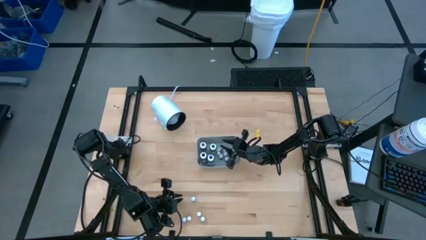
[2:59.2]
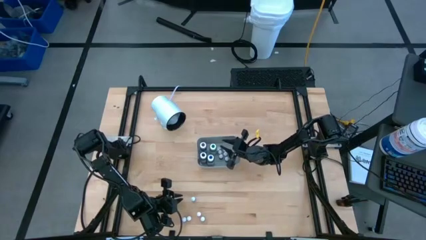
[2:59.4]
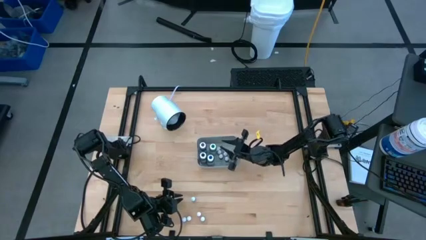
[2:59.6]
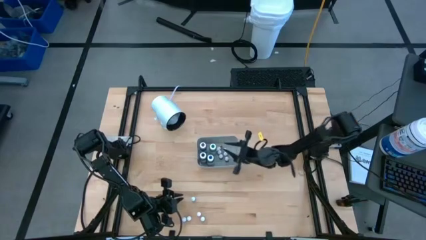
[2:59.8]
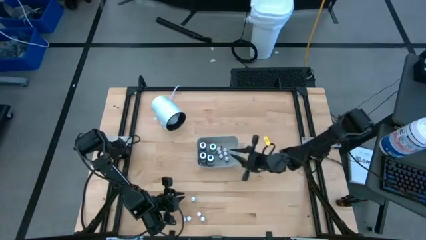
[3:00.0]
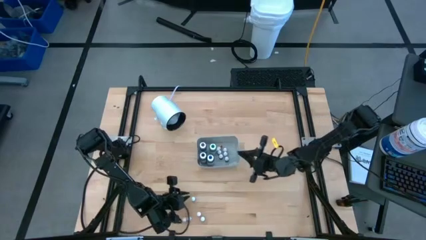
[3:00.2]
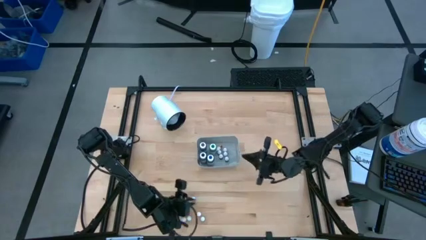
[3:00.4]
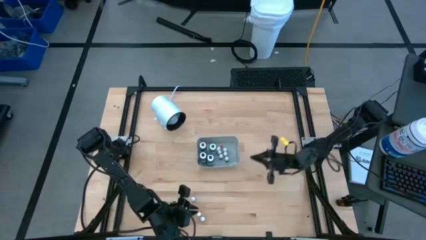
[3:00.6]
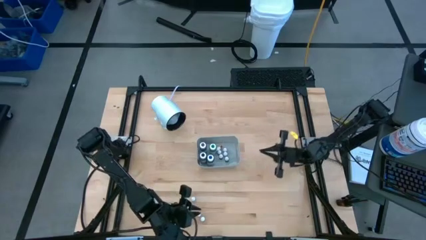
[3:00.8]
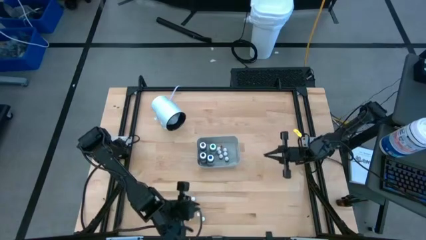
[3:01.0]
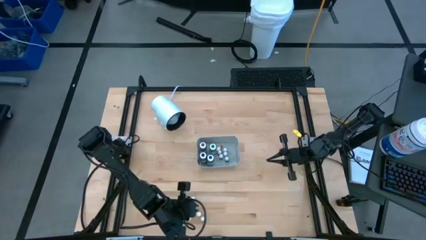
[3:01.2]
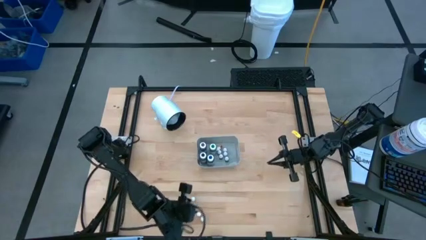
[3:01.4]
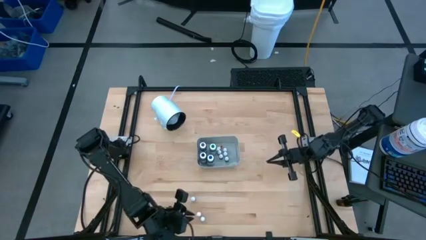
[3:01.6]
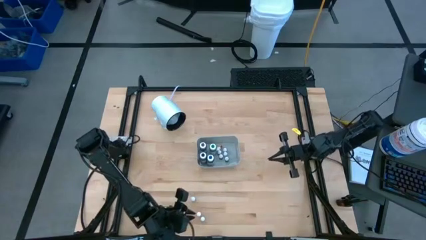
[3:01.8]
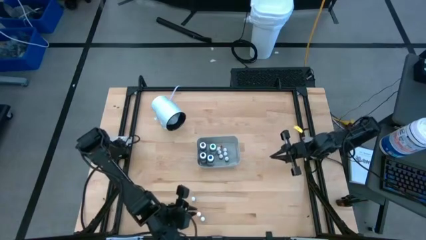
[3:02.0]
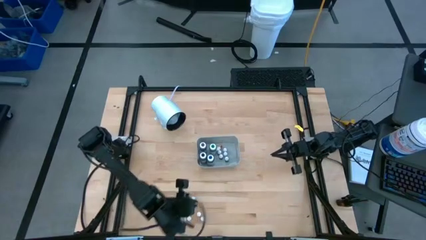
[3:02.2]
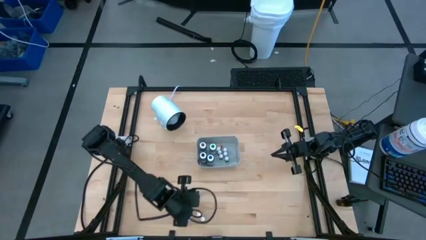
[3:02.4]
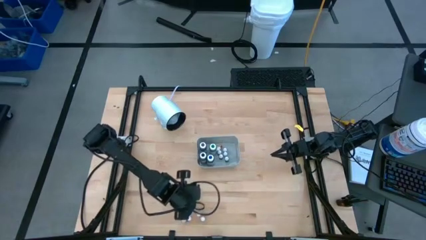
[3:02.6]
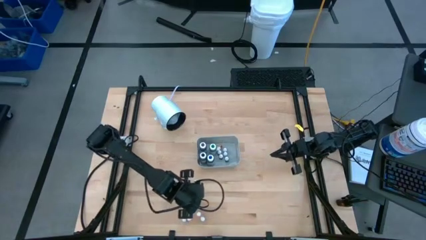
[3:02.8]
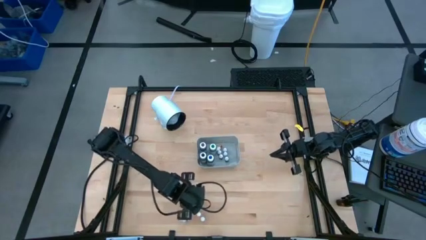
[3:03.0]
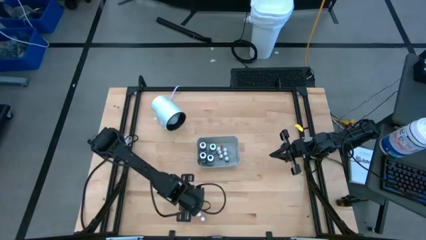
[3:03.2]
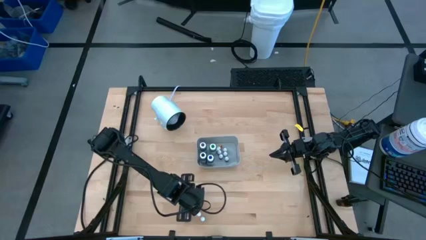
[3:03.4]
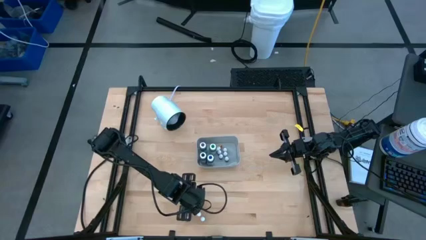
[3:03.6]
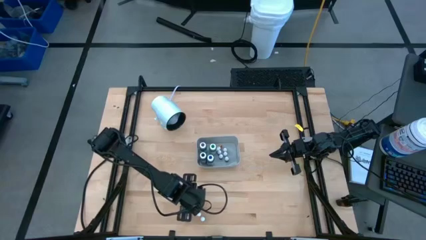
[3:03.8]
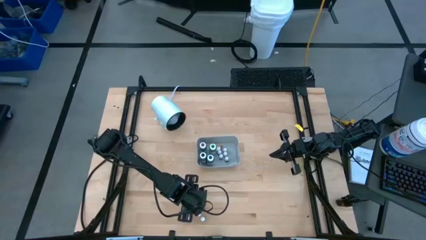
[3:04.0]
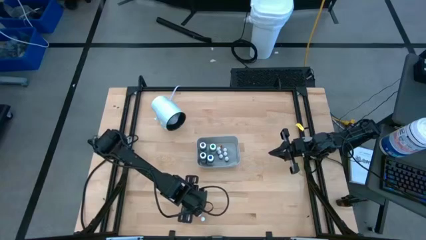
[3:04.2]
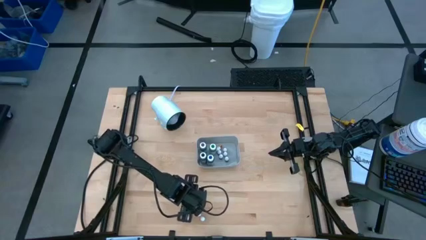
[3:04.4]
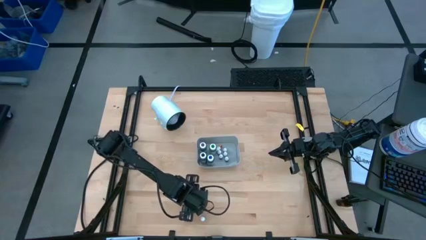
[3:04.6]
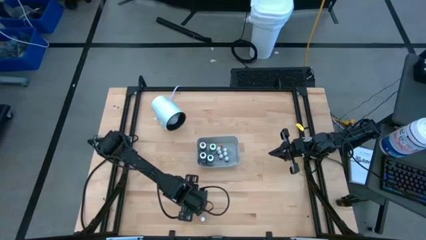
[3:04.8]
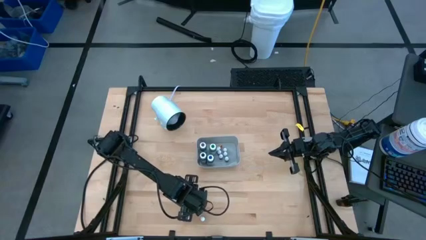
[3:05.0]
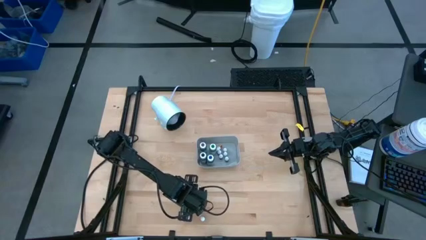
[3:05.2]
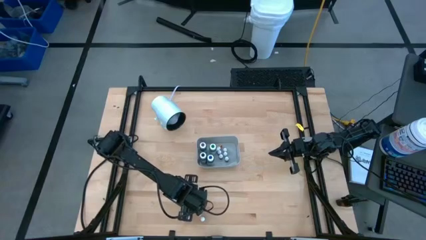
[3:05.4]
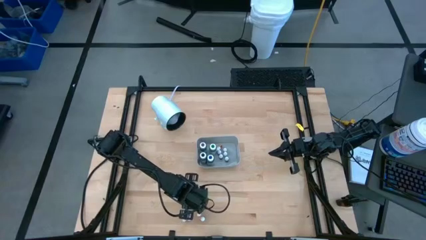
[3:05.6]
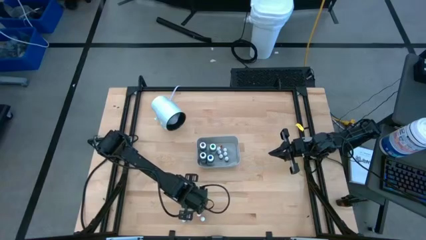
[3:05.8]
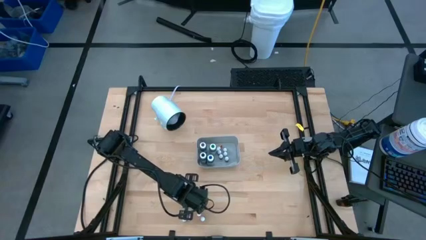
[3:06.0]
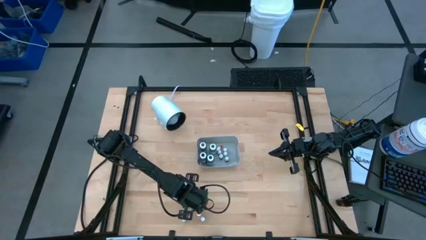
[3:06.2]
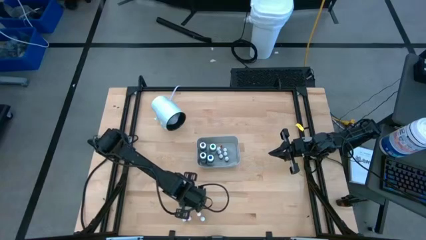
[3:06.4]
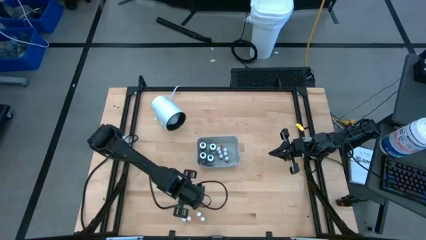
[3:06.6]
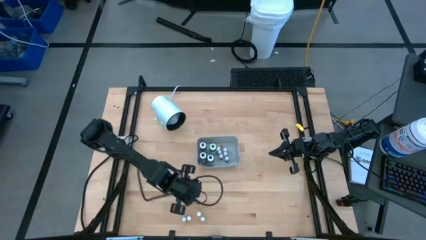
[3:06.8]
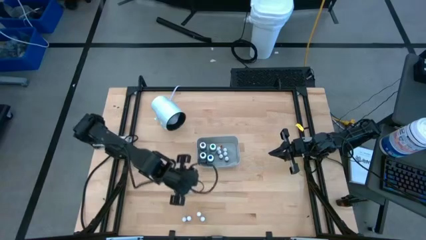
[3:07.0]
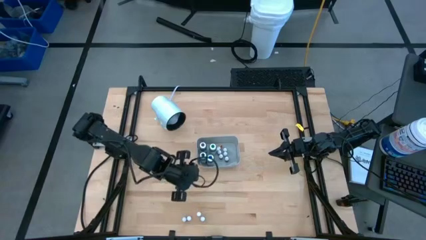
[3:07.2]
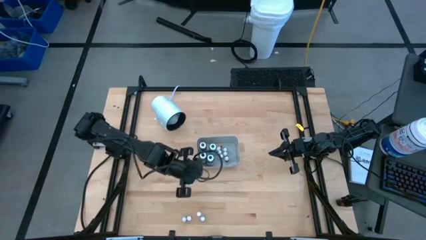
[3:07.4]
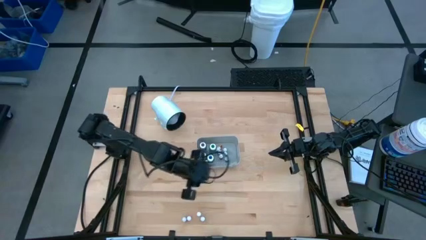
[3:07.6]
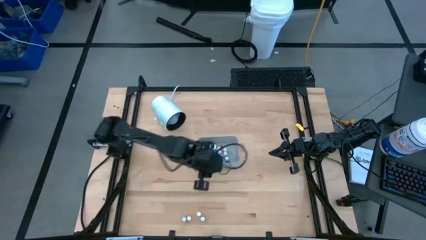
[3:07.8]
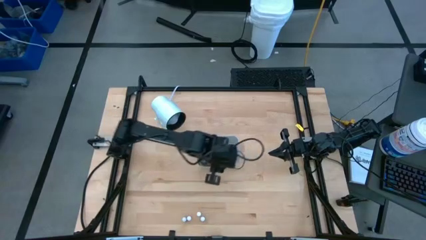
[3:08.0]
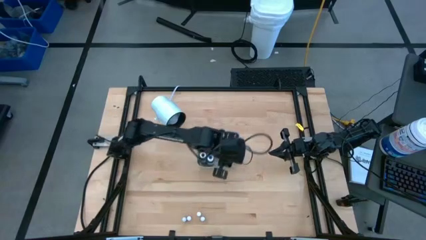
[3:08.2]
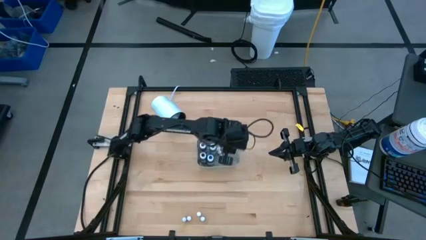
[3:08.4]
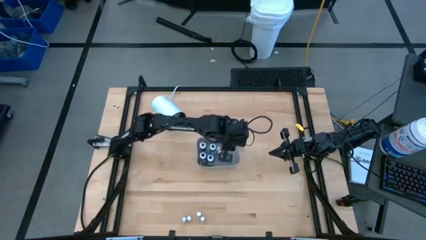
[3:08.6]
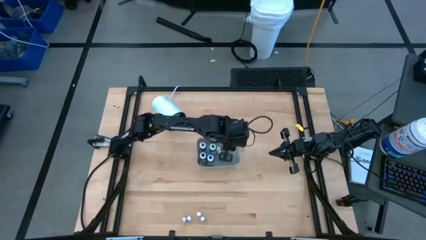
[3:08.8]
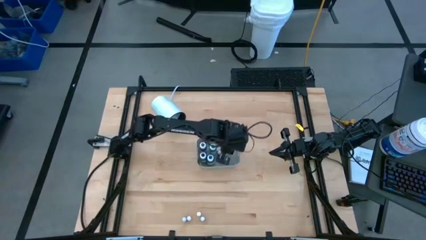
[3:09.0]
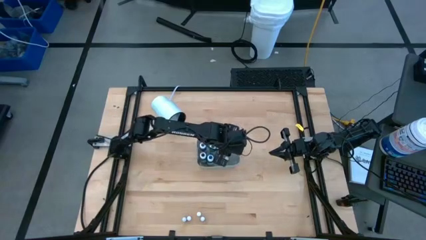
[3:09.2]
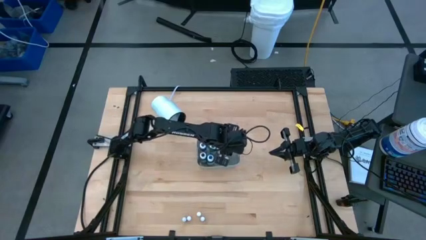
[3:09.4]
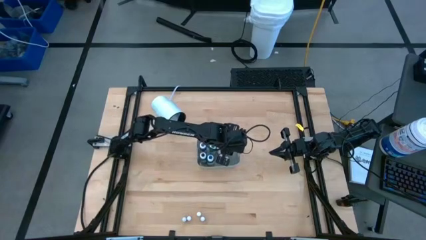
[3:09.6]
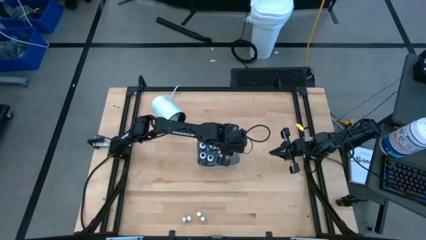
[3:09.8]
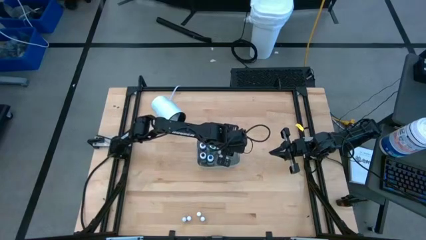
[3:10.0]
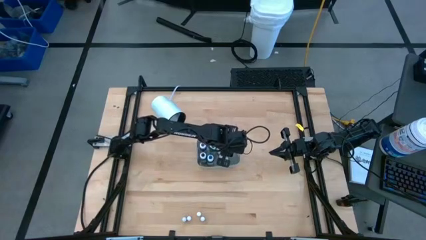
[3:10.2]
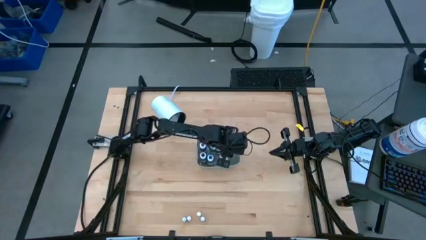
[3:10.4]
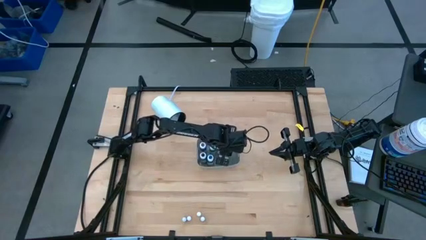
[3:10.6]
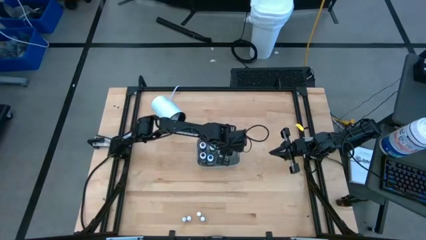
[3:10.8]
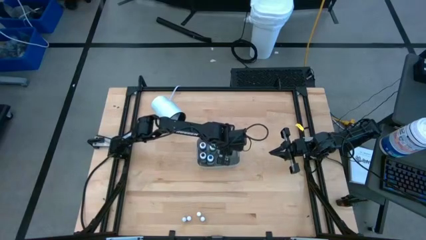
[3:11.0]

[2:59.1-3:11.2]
Task: Pick & Place food coloring
Put the small green food coloring bottle into the gray bin
